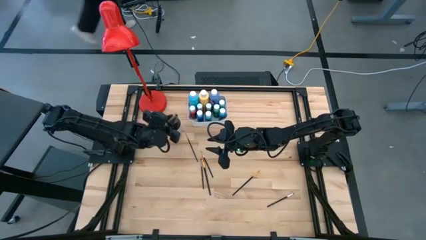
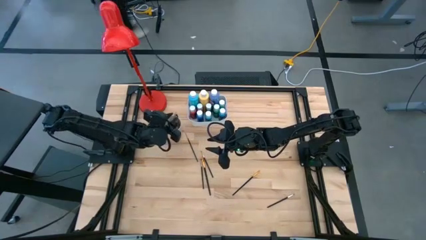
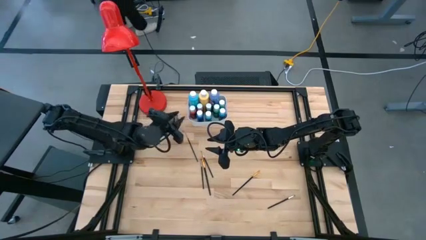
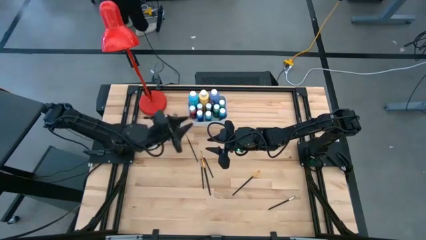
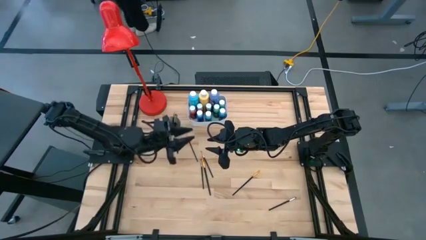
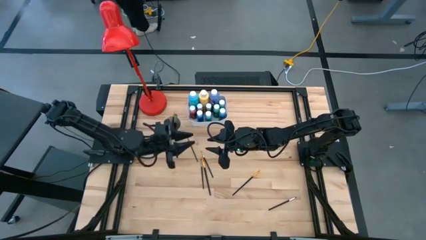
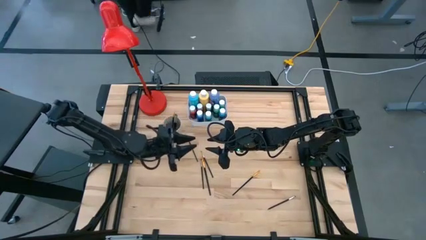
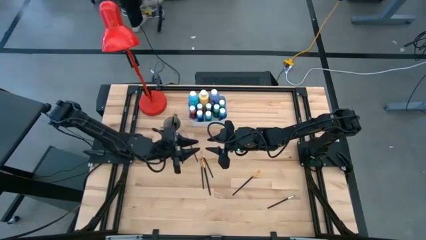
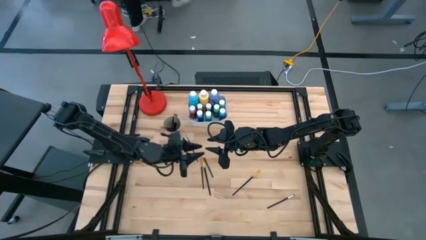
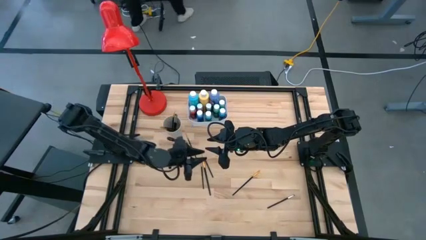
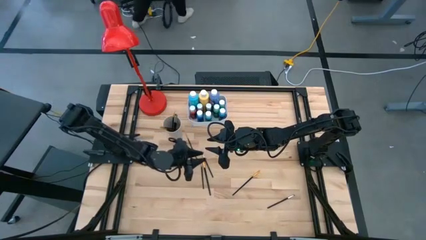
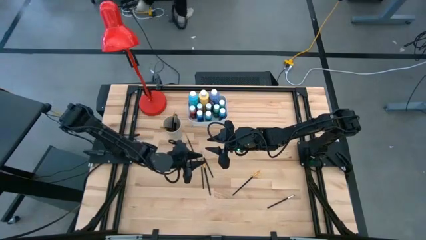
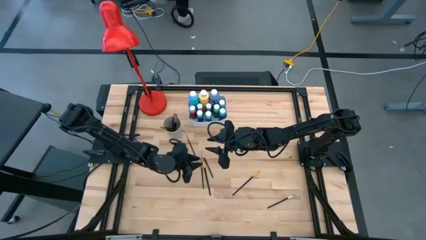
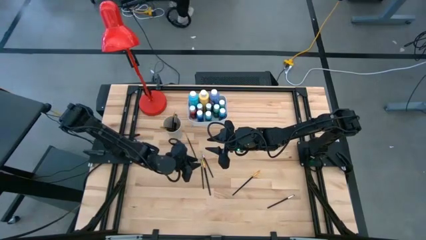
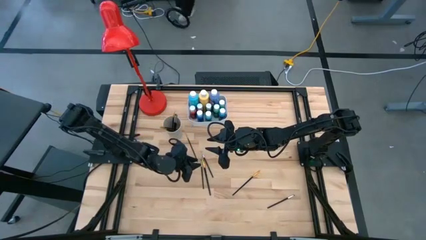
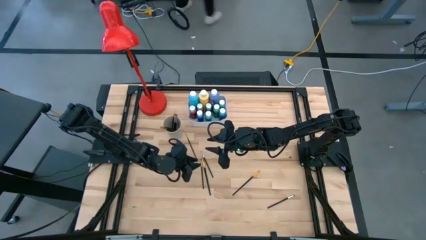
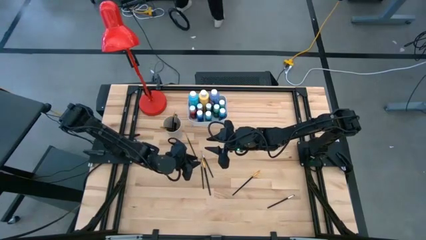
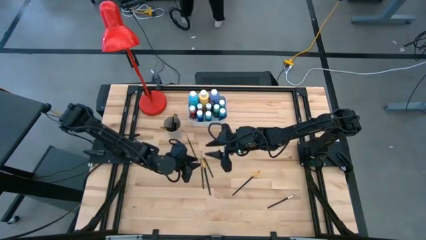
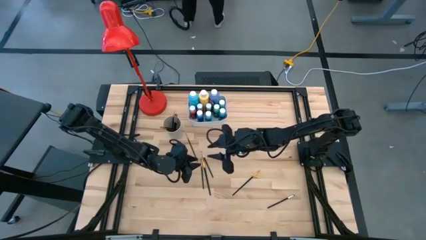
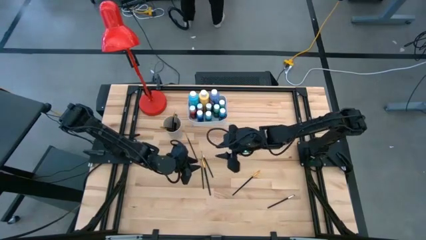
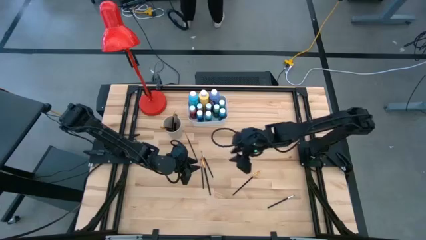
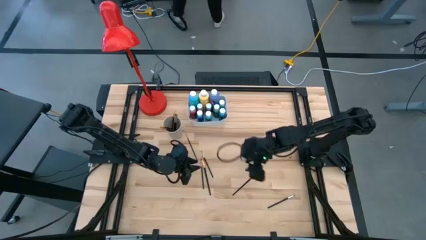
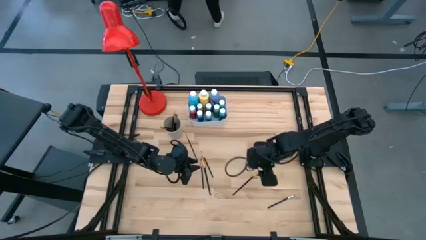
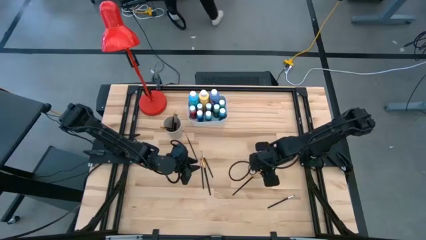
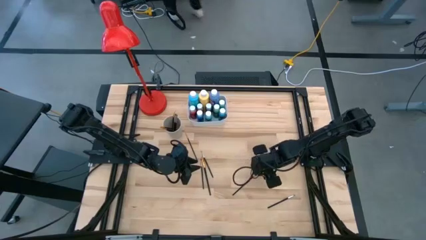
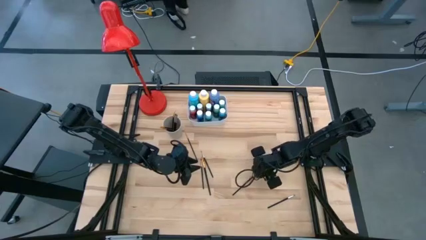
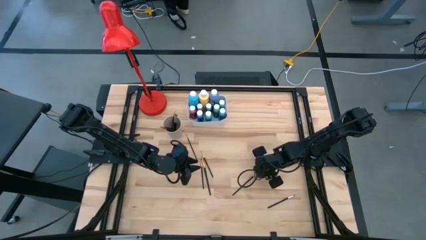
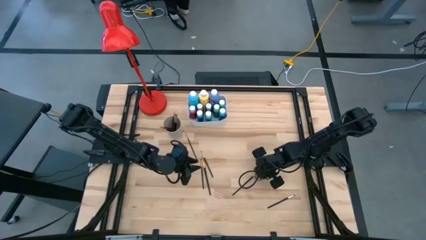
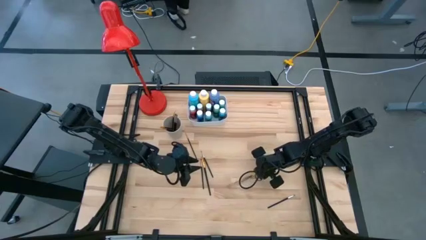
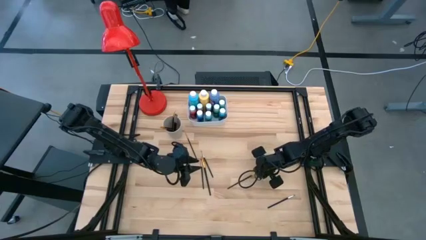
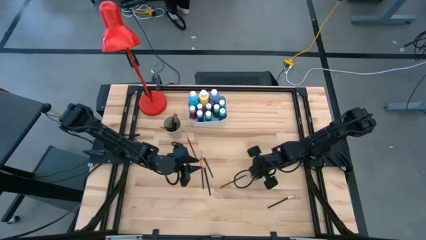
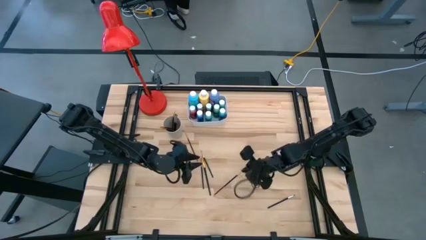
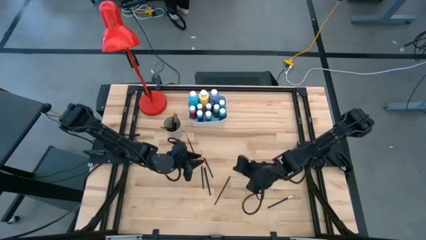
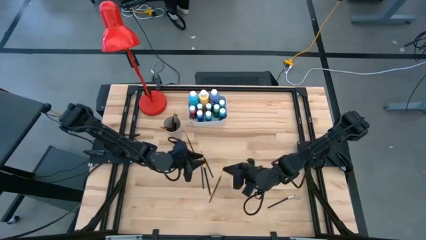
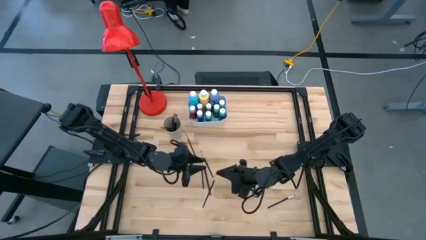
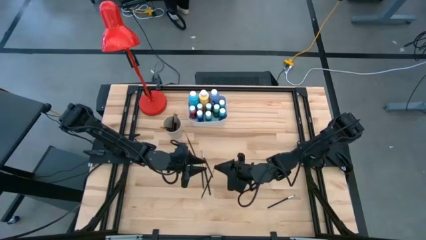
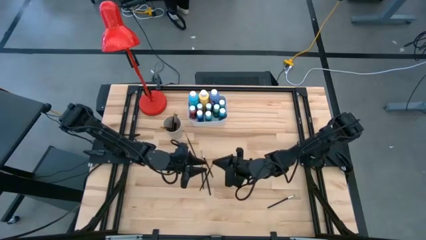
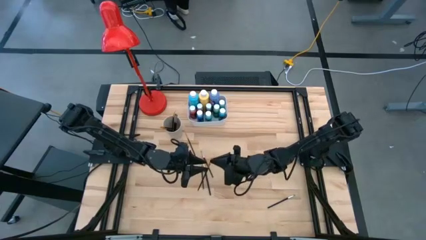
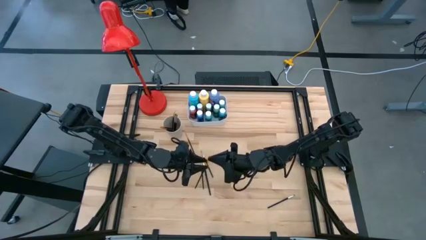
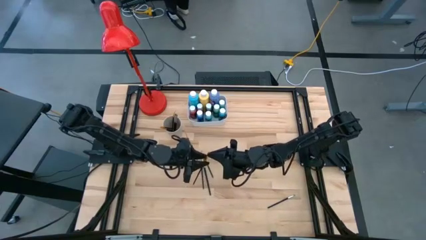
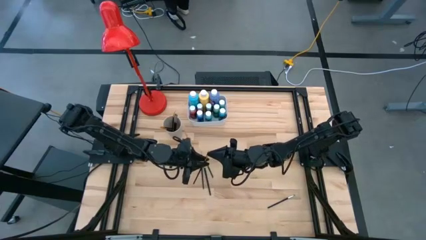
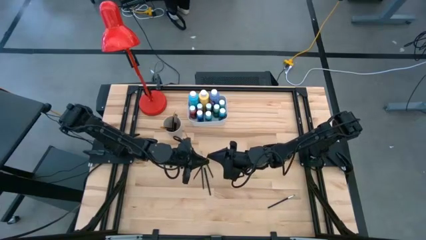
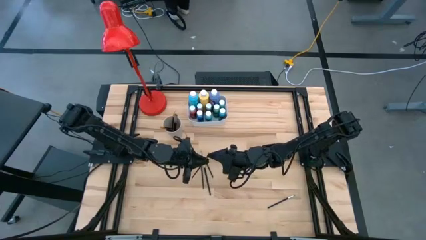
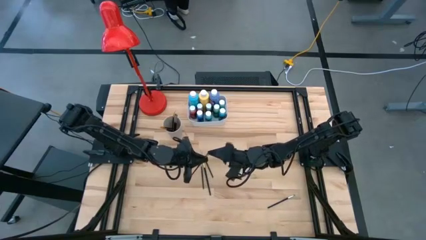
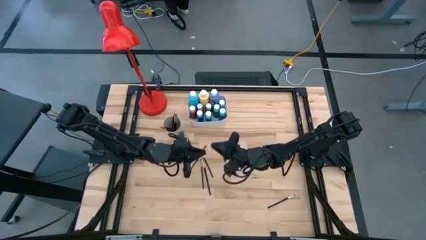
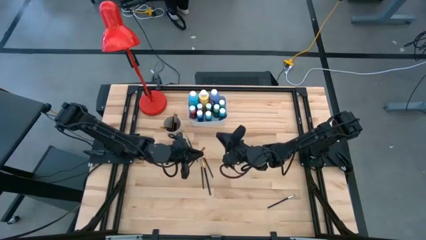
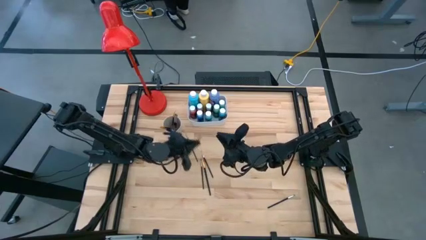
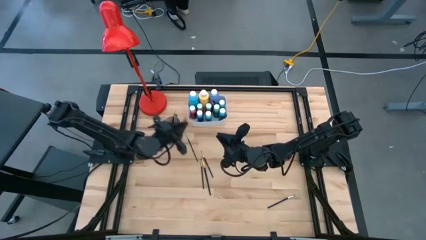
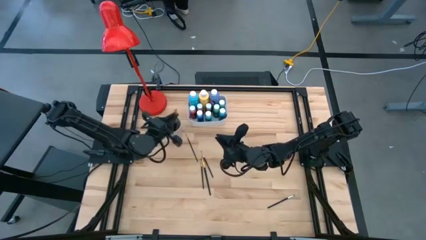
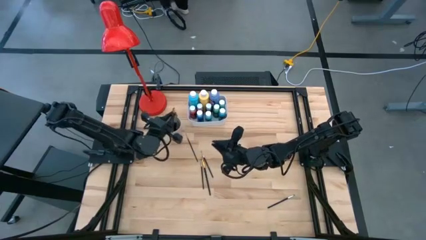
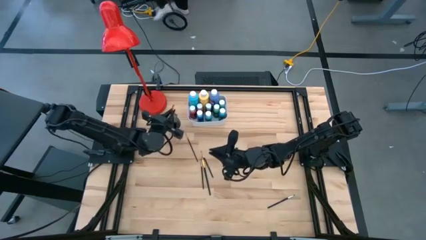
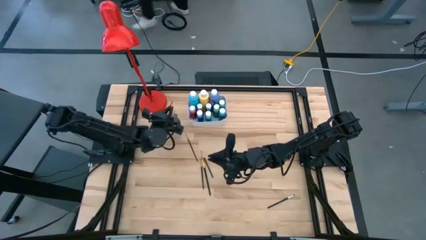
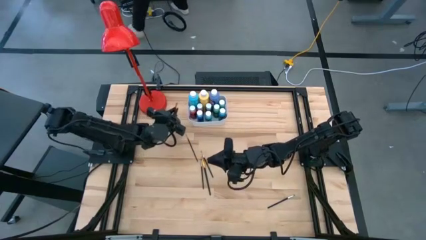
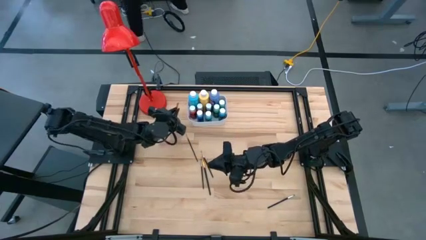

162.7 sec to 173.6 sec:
Task: Pick & Place Paint Supplies
Put the black paint brush into the white cup

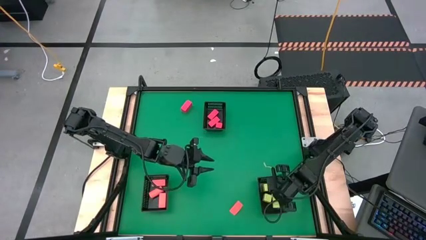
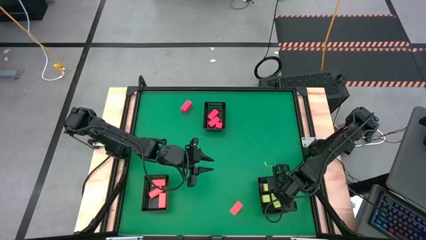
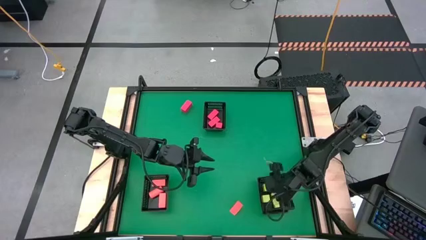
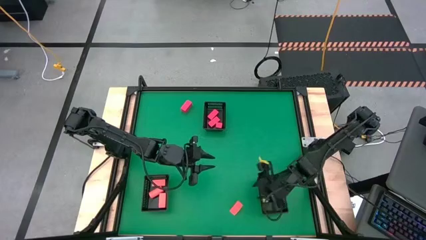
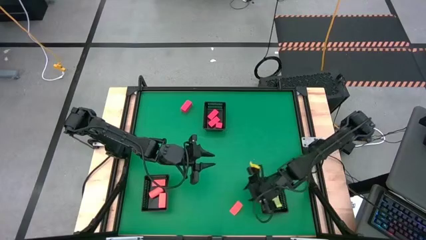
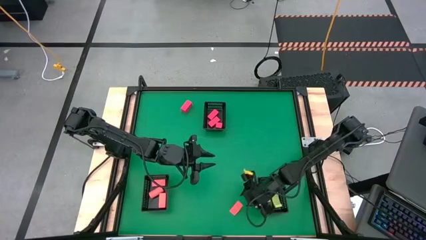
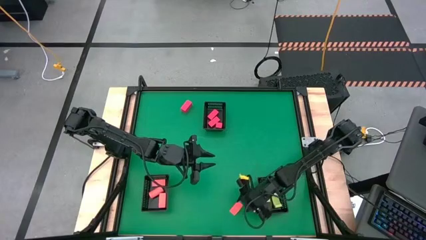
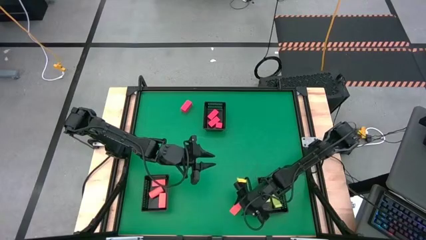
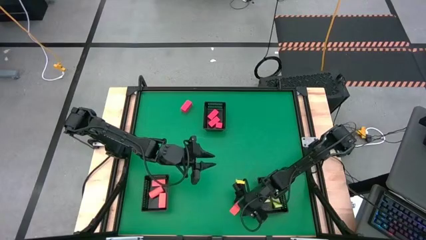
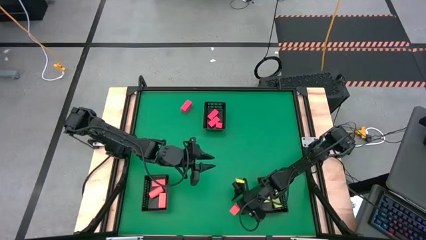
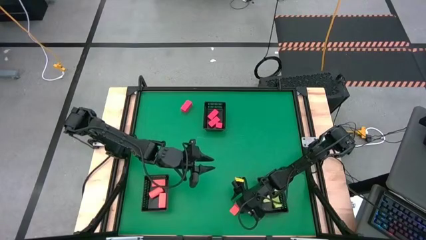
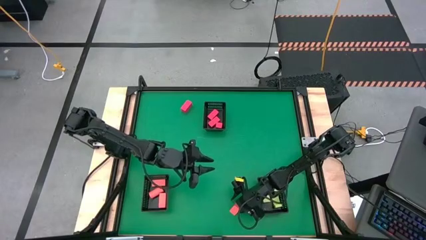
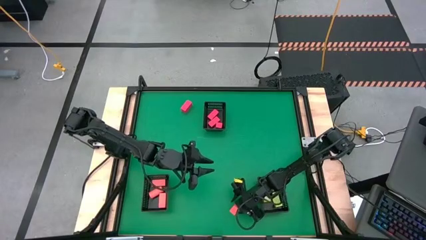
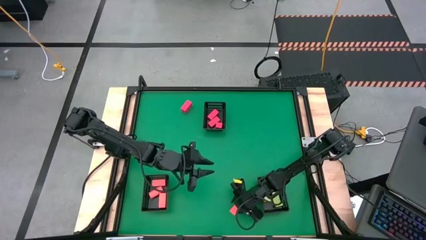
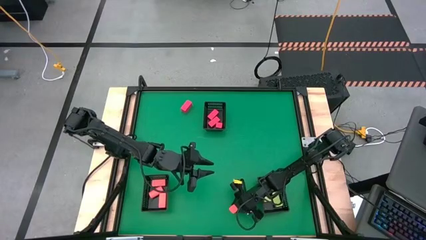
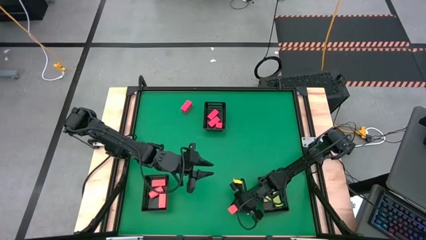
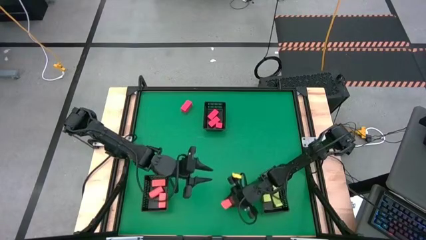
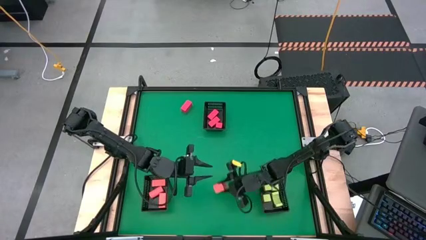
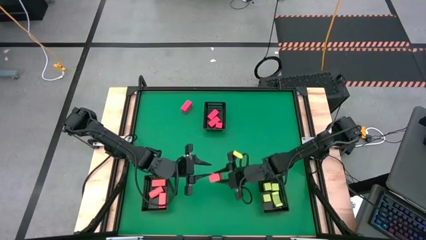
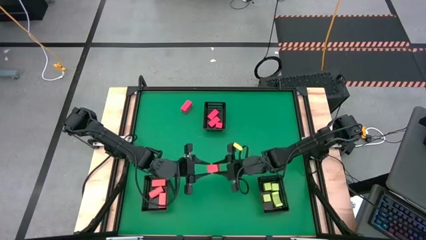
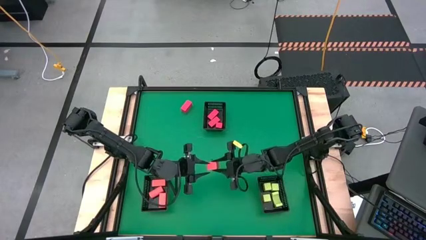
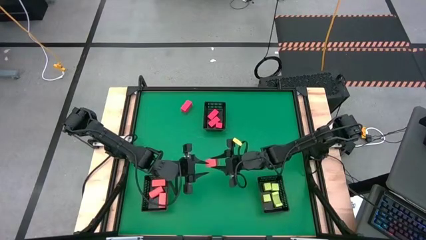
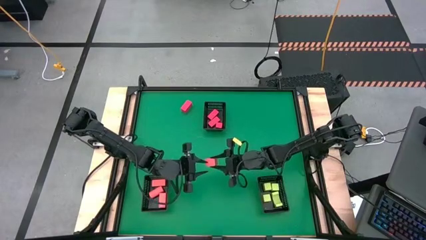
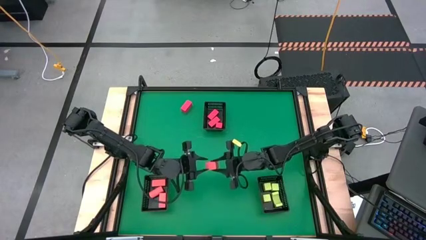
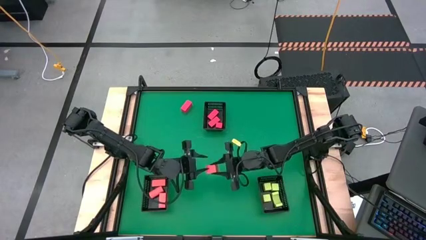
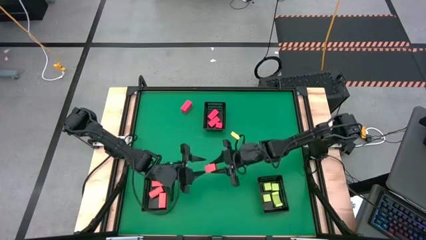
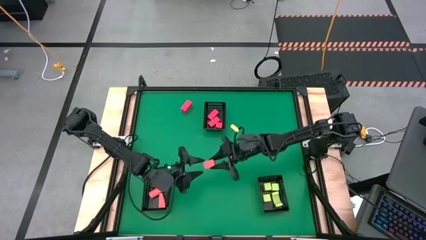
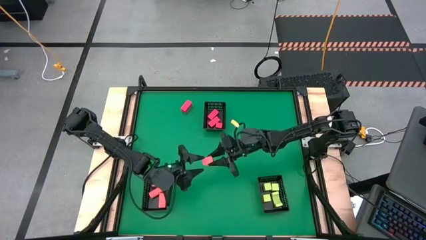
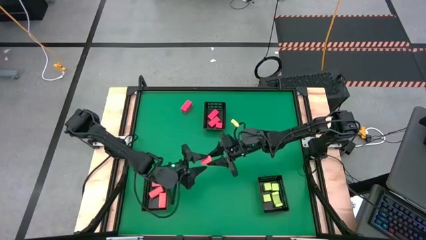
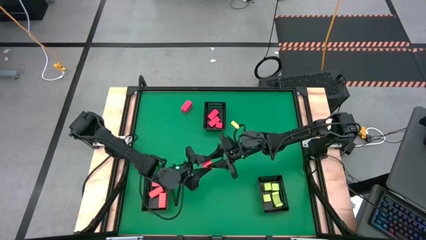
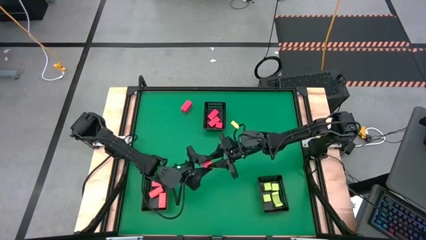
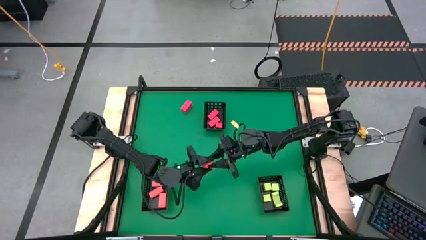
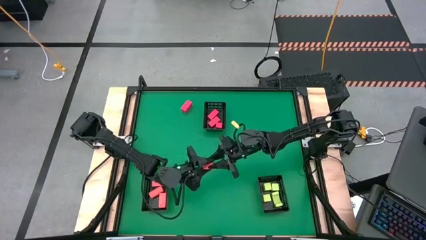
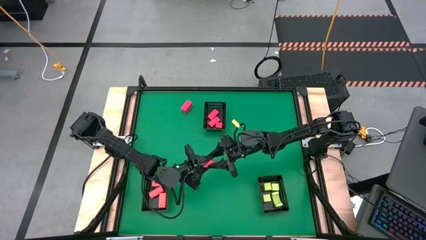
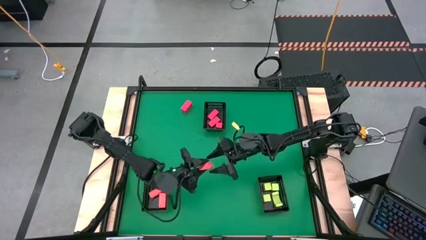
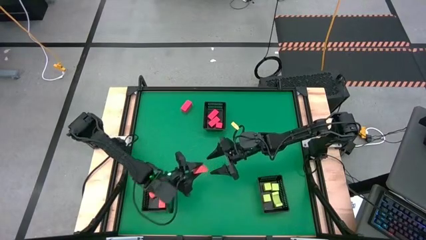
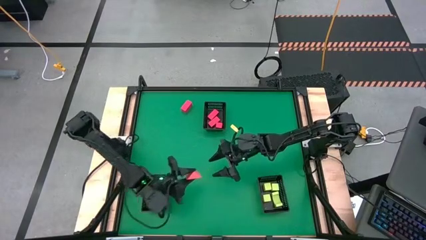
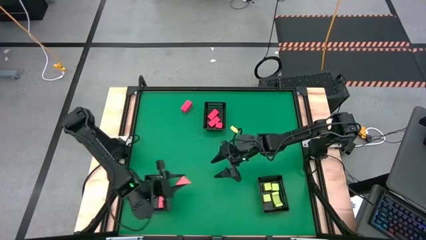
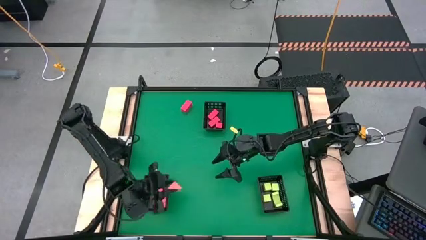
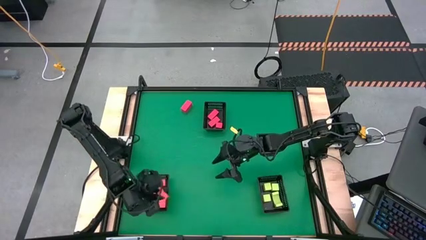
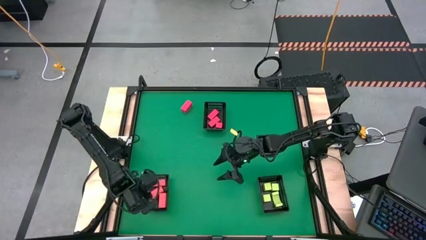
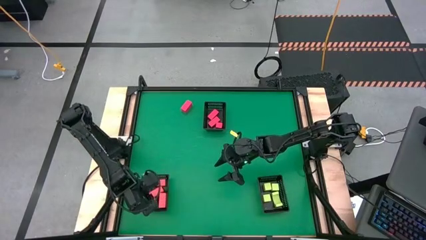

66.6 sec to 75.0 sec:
Task: Sort & place blocks by color
Put the orange block into the bottom left black bin
